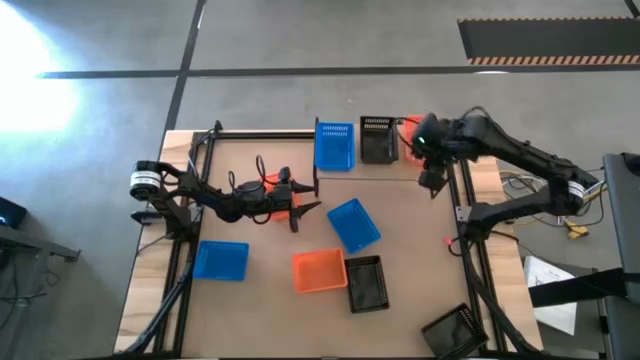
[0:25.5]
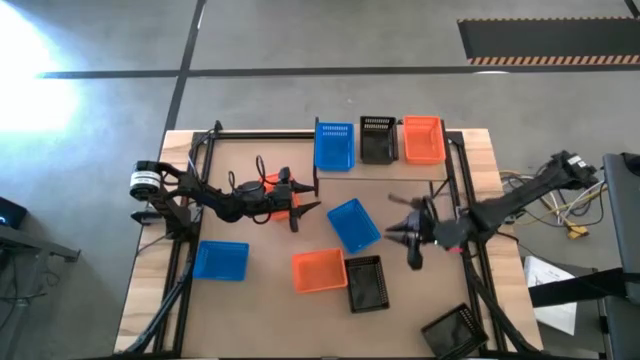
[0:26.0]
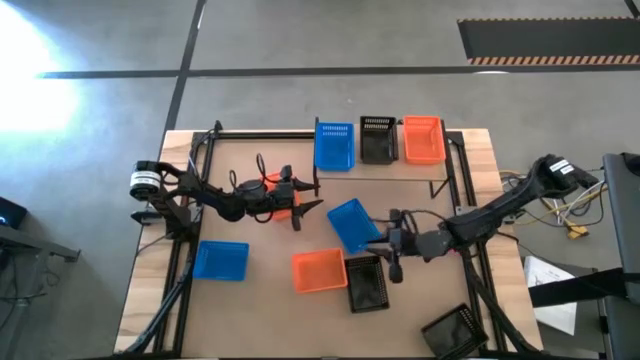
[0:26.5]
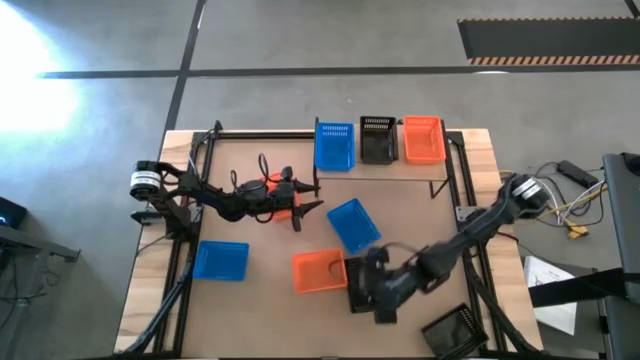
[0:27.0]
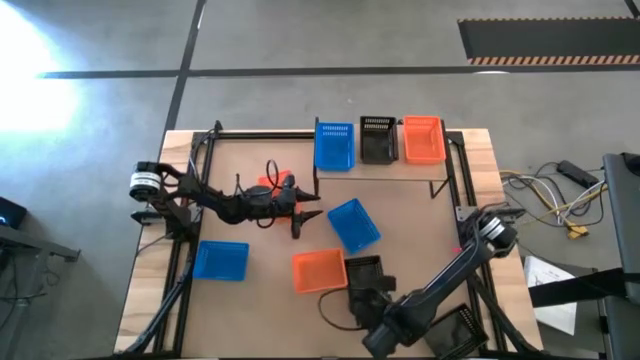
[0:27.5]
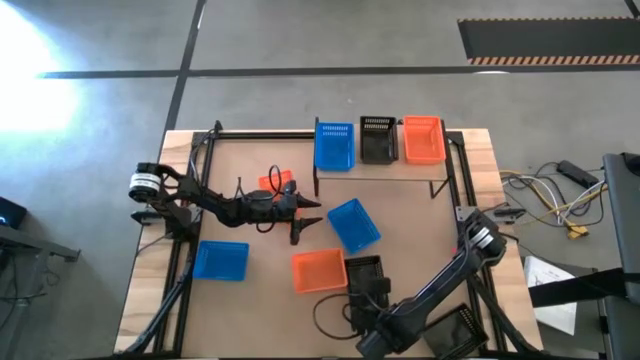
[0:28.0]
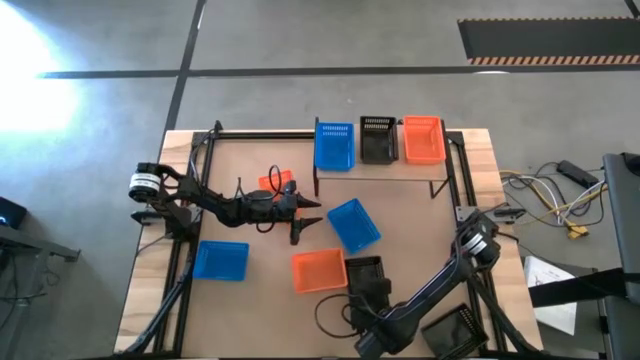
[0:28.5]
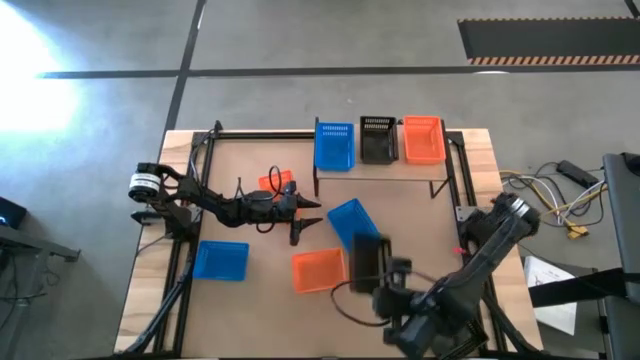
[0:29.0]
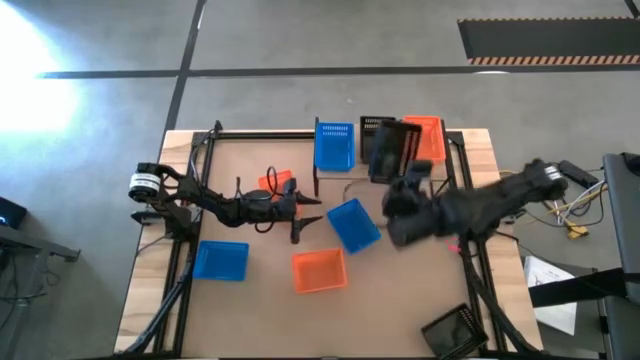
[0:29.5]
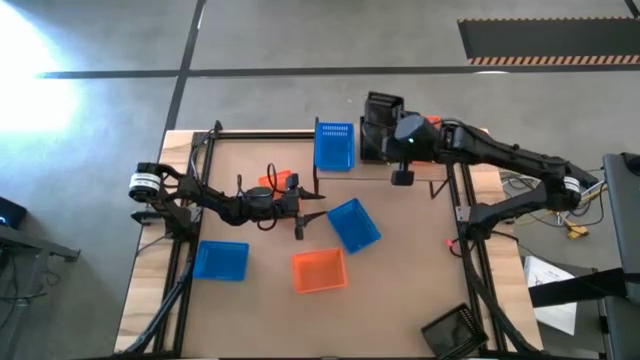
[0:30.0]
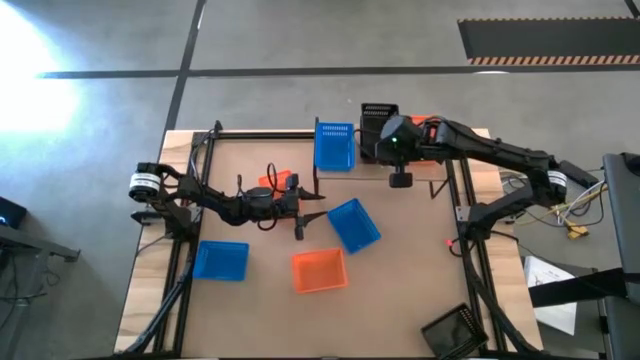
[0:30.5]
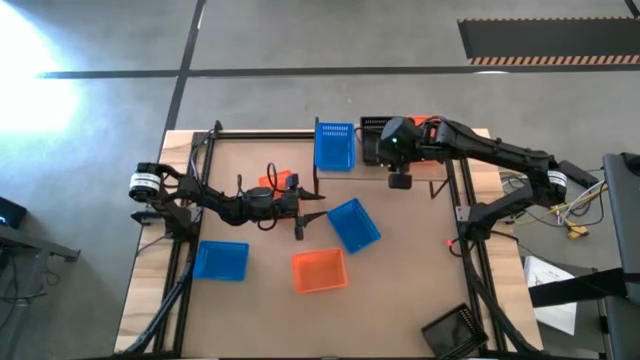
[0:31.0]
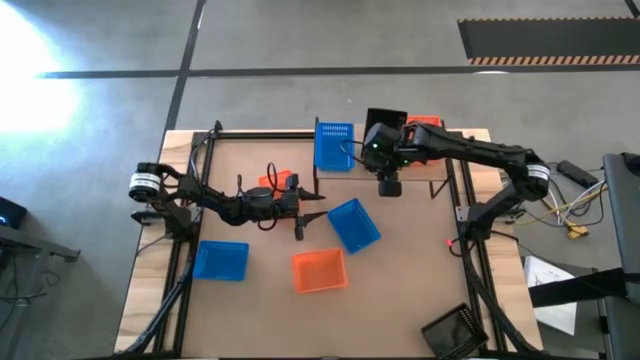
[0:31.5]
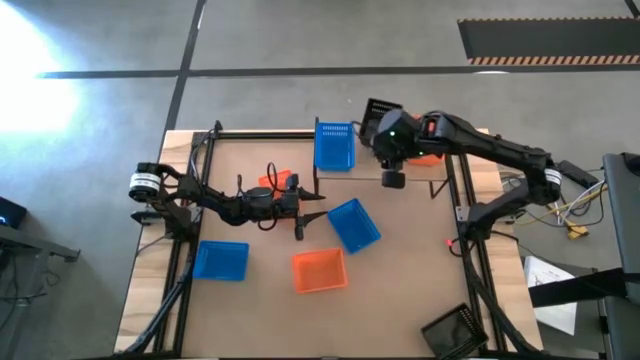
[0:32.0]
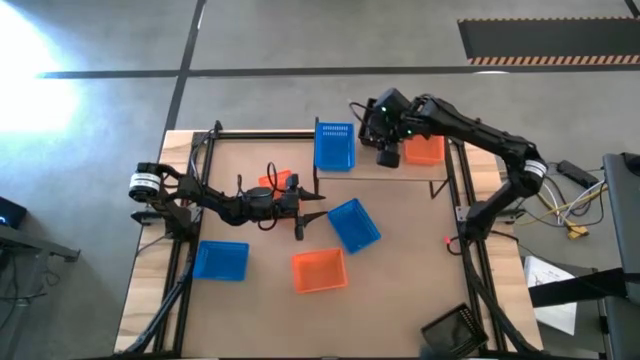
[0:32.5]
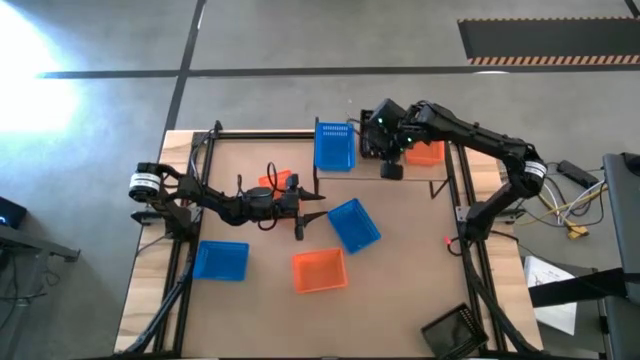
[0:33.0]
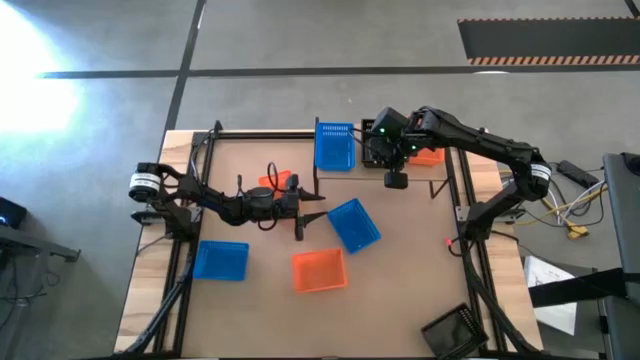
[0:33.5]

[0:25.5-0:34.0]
Task: Stack baskets on shelf by color
Stack the top black bin on top of the black bin on the shelf

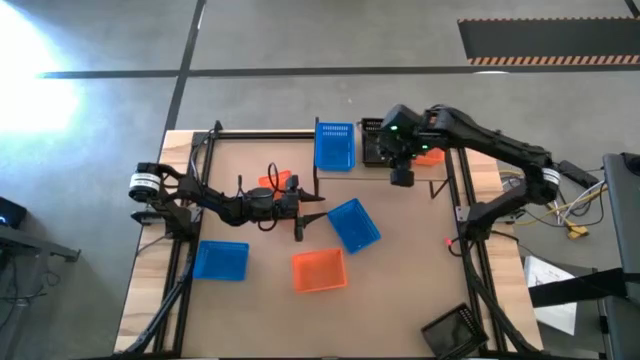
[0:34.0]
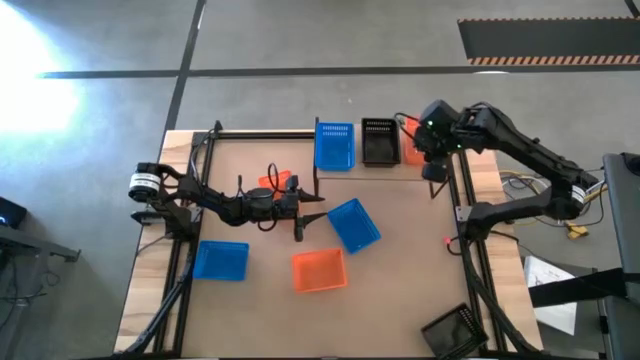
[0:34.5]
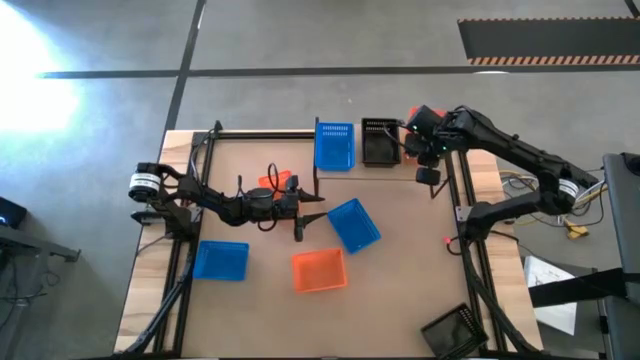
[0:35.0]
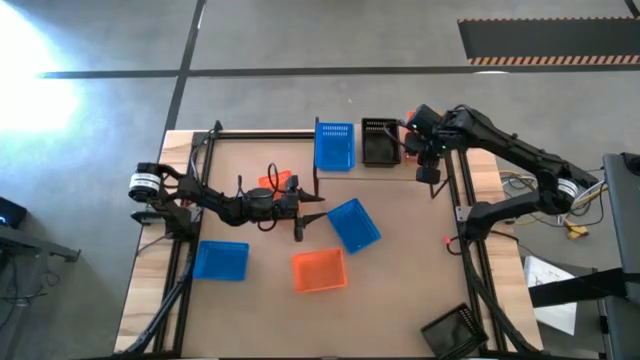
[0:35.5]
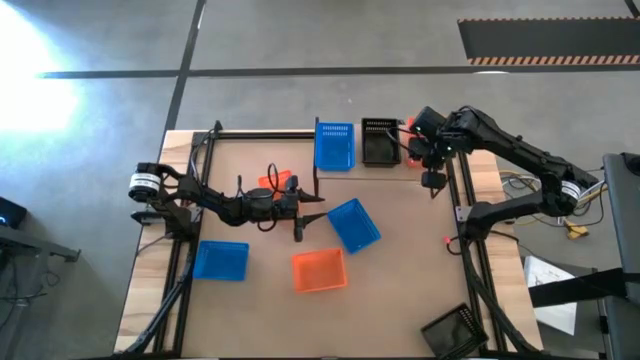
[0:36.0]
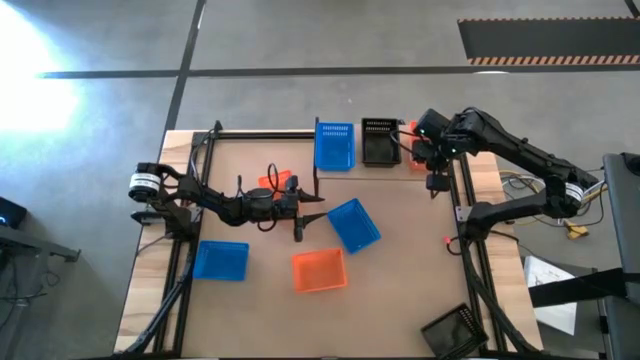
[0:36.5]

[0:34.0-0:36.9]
Adjust the orange bin on the shelf

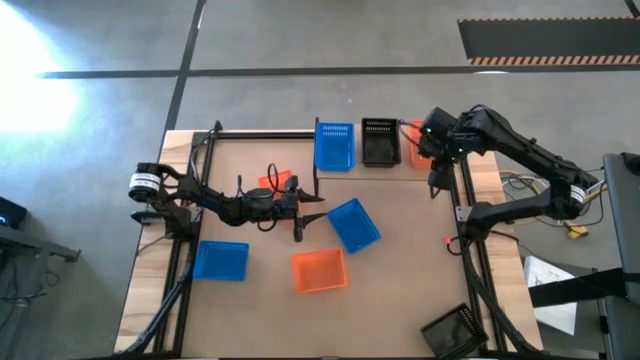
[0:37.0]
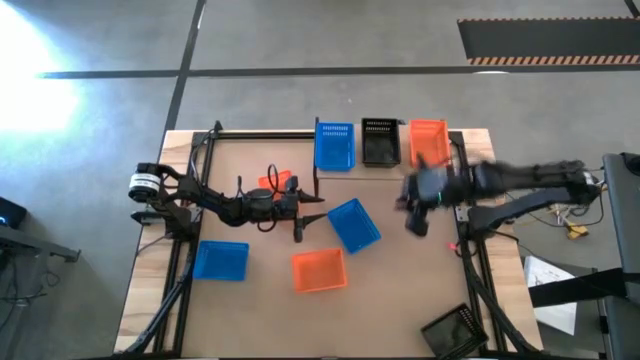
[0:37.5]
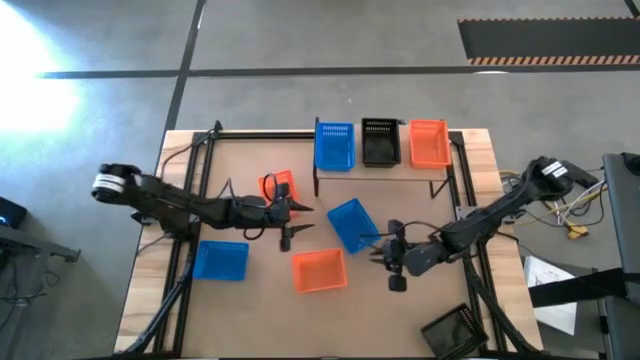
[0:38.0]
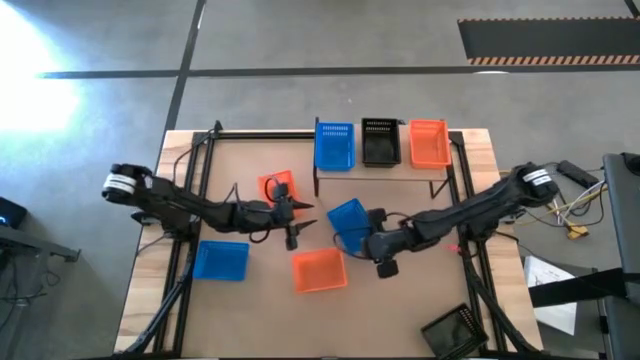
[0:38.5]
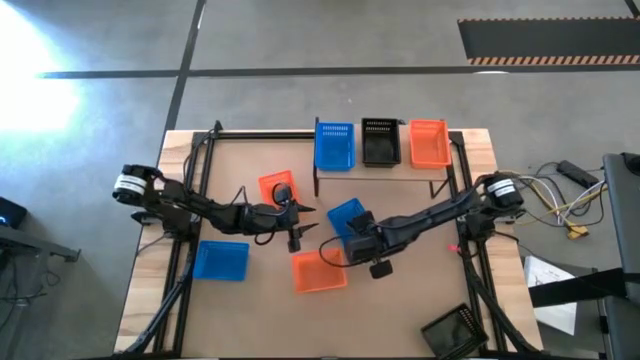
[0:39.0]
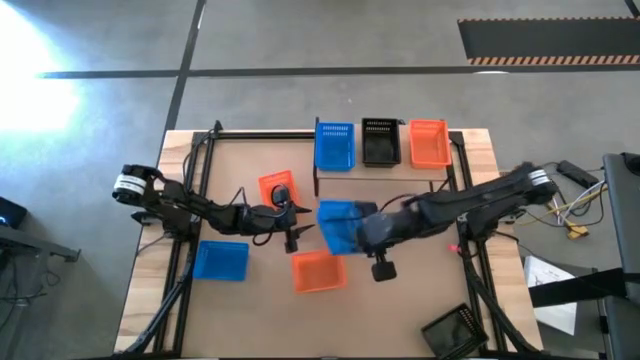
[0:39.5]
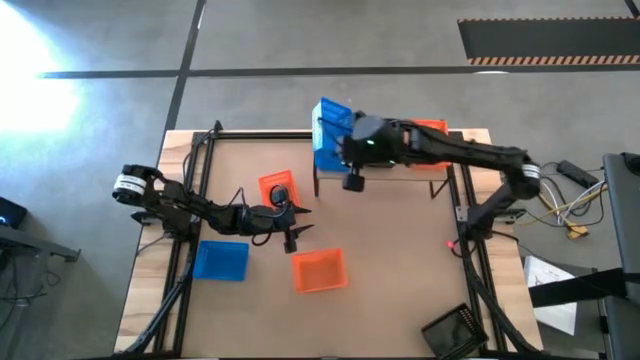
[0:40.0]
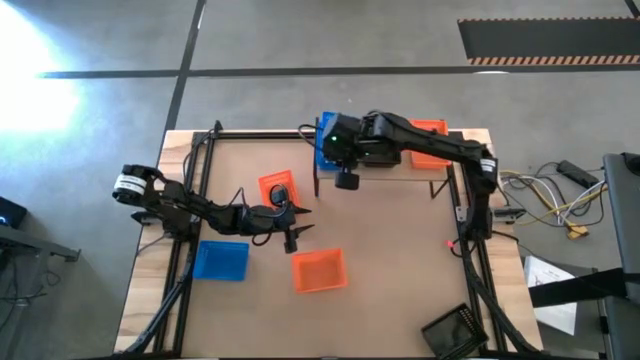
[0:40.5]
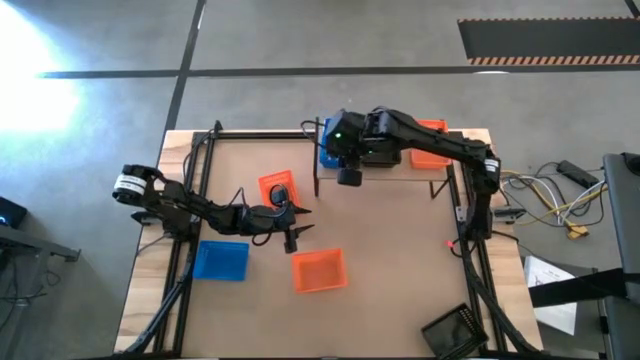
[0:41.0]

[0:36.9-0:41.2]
Stack the right blue bin on top of the blue bin on the shelf

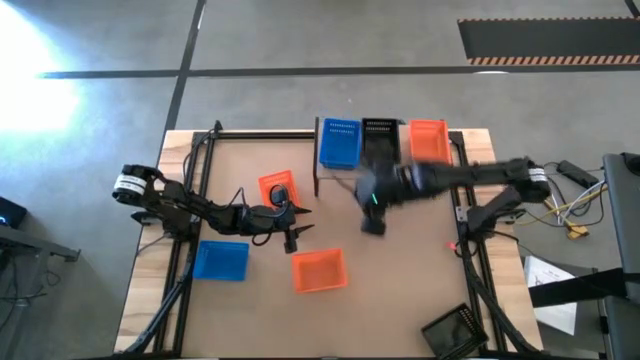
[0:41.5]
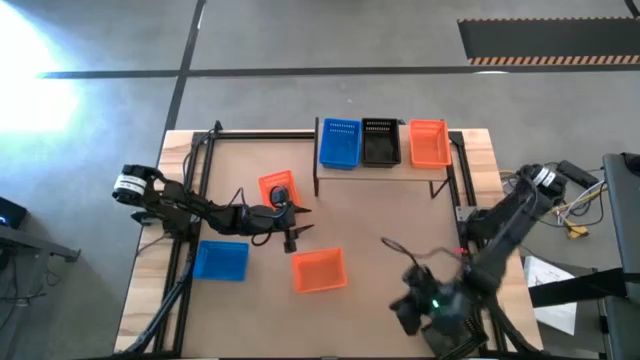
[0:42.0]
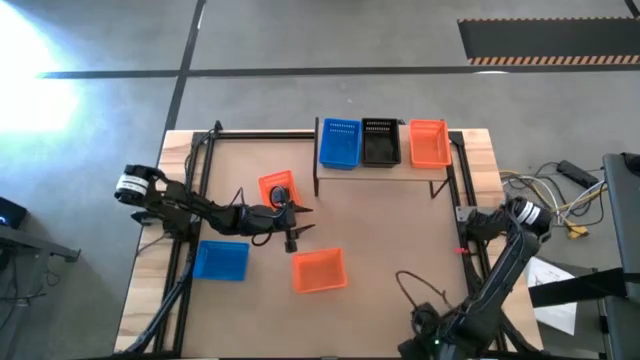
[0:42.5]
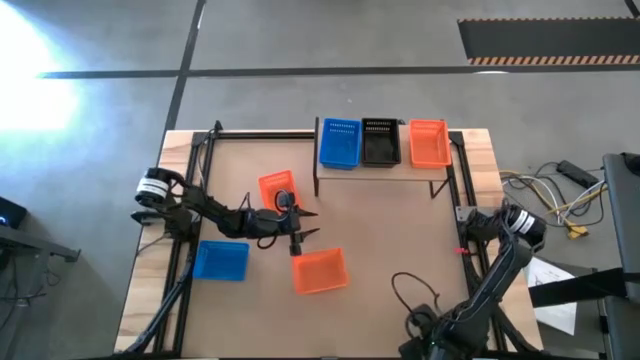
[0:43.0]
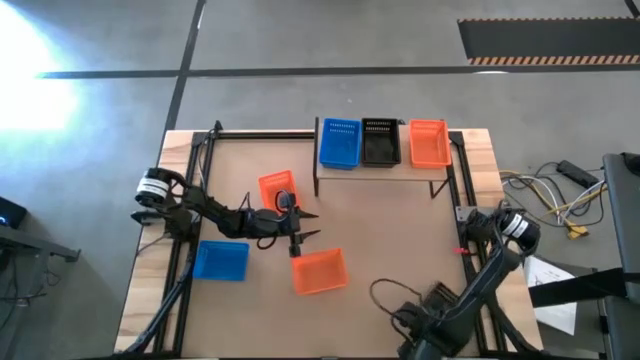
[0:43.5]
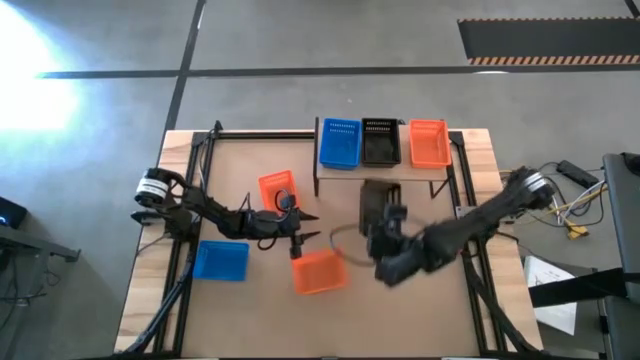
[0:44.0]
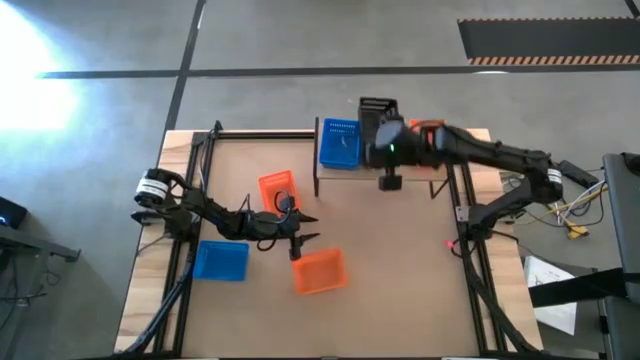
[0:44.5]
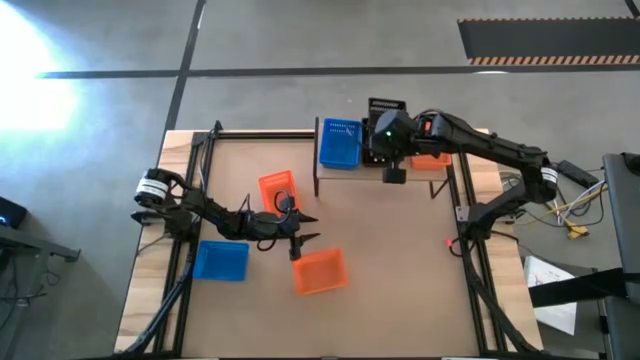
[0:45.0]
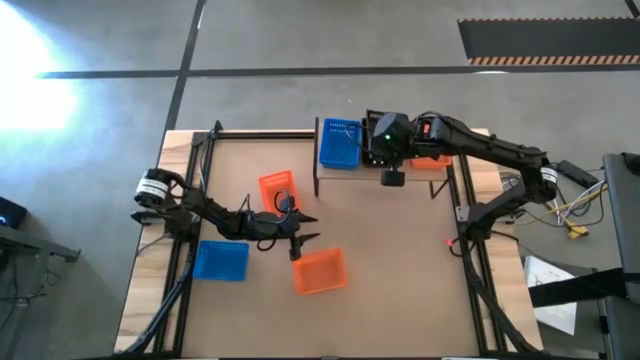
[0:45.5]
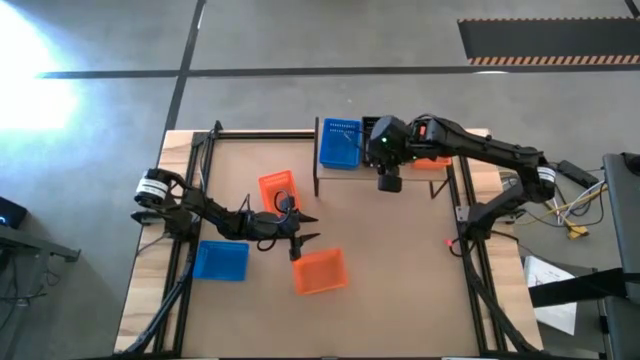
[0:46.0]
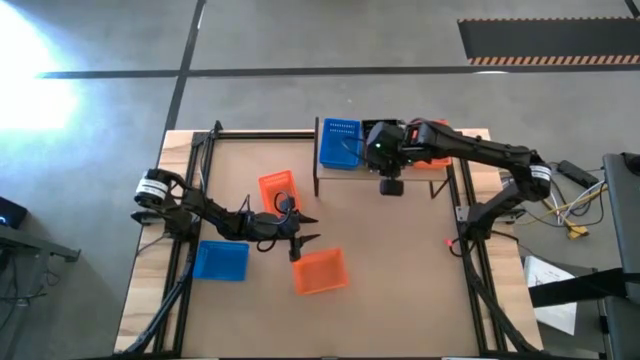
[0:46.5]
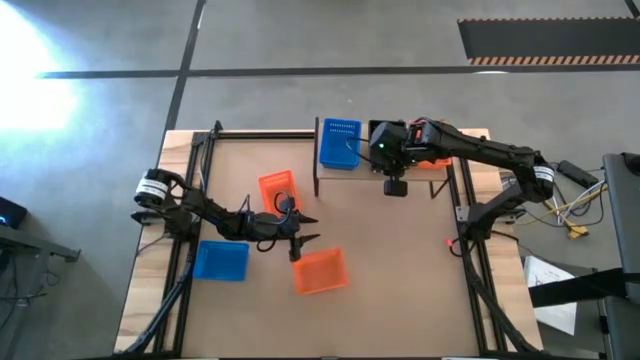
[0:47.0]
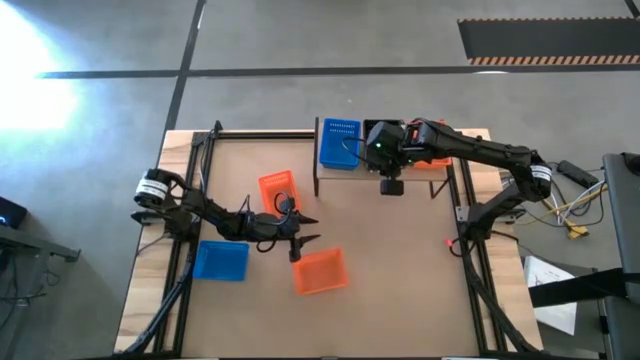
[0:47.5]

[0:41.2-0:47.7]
Stack the black bin on top of the black bins on the shelf
